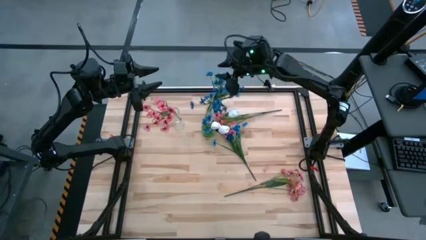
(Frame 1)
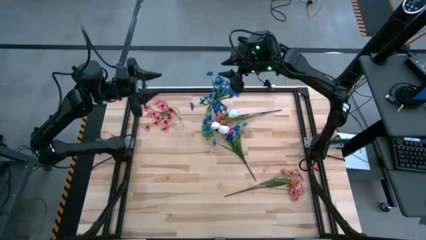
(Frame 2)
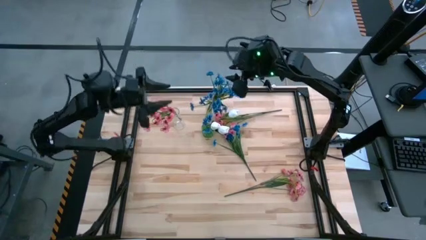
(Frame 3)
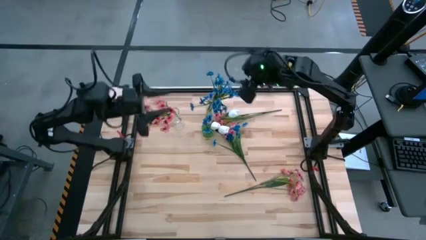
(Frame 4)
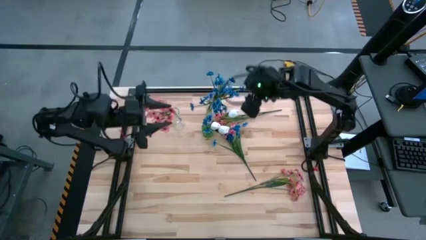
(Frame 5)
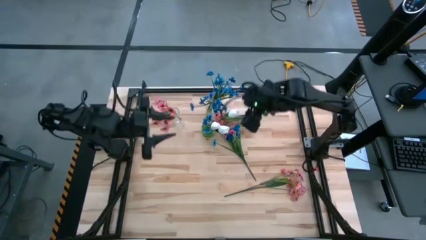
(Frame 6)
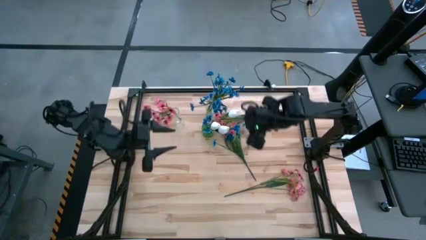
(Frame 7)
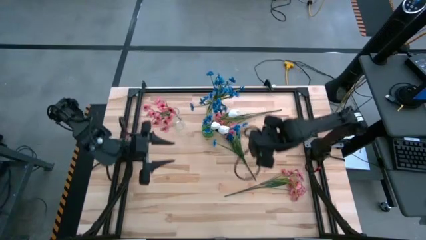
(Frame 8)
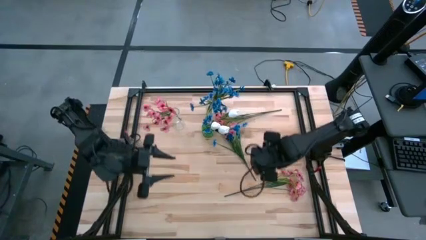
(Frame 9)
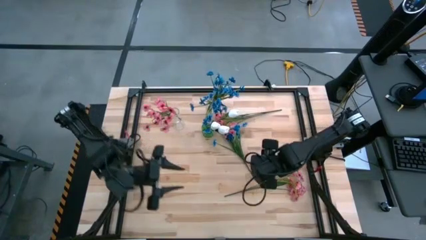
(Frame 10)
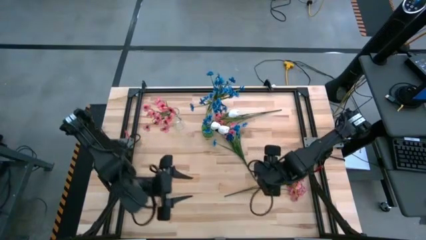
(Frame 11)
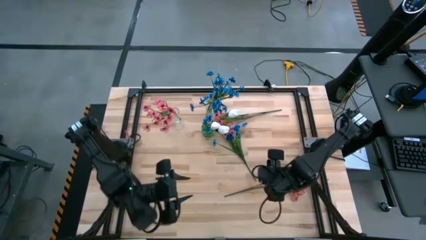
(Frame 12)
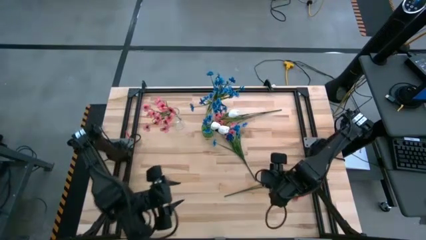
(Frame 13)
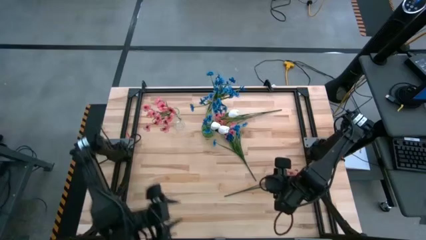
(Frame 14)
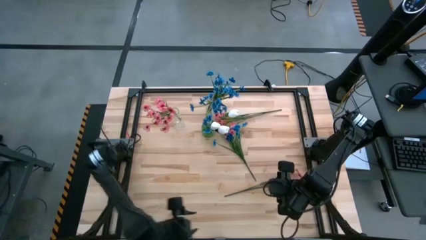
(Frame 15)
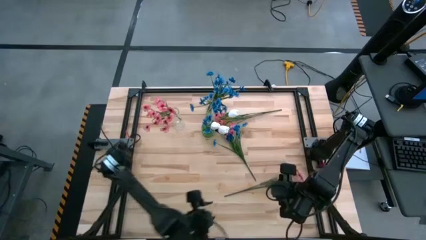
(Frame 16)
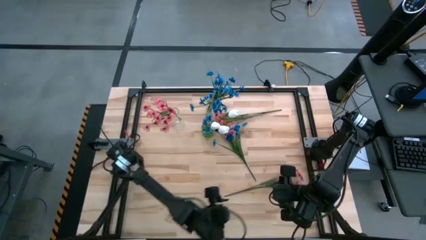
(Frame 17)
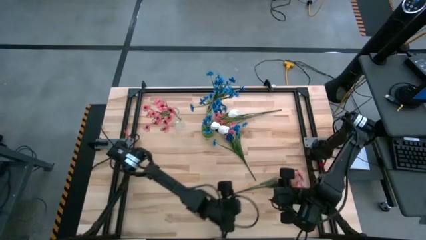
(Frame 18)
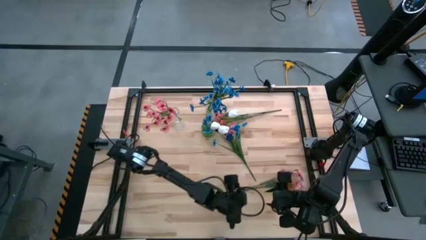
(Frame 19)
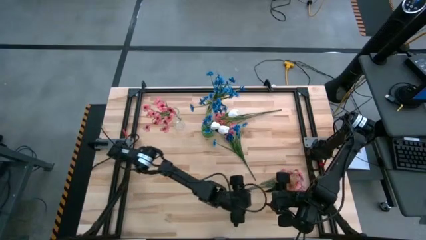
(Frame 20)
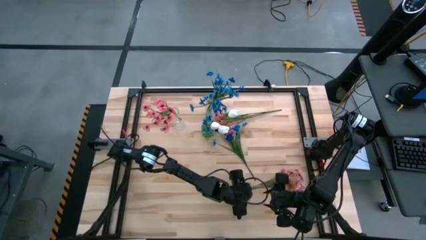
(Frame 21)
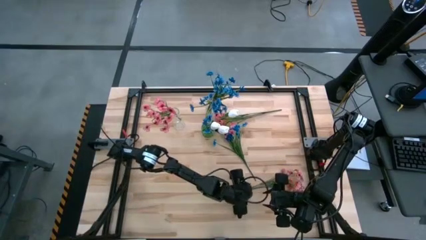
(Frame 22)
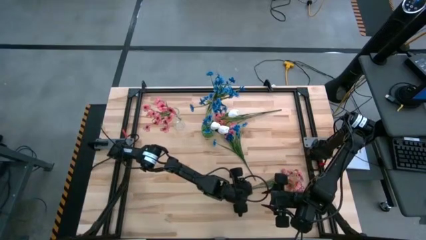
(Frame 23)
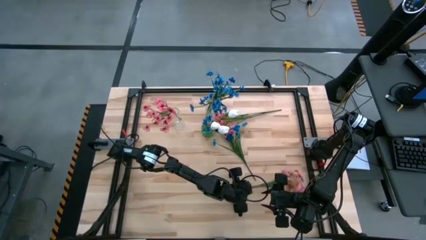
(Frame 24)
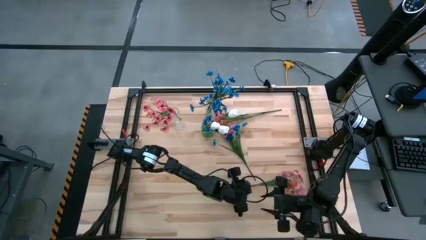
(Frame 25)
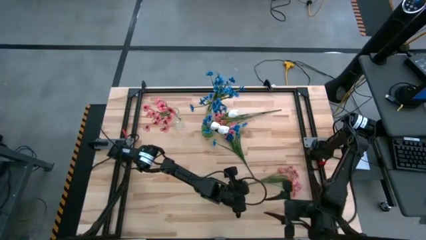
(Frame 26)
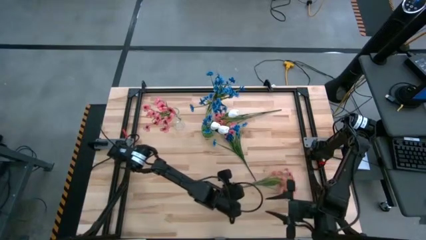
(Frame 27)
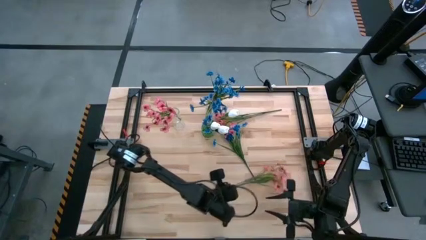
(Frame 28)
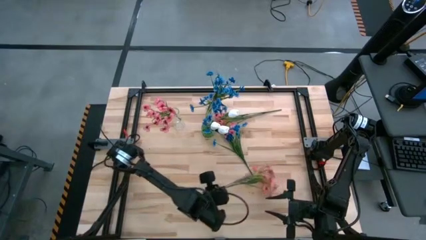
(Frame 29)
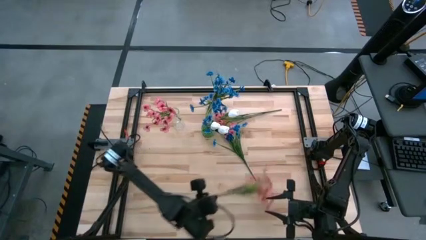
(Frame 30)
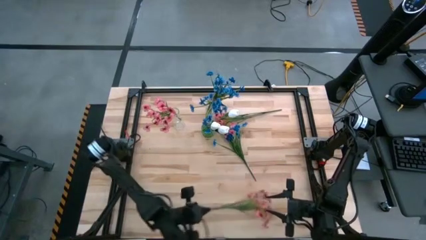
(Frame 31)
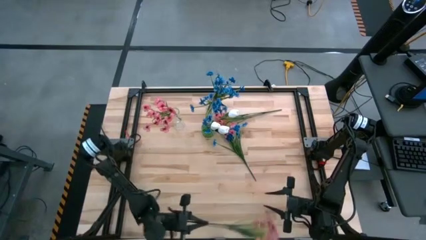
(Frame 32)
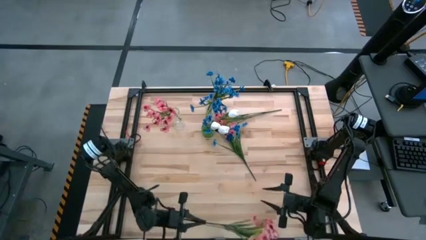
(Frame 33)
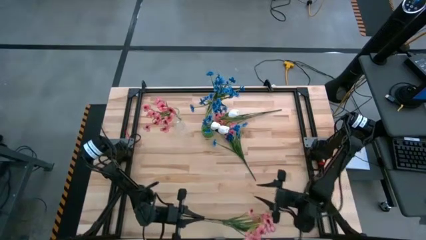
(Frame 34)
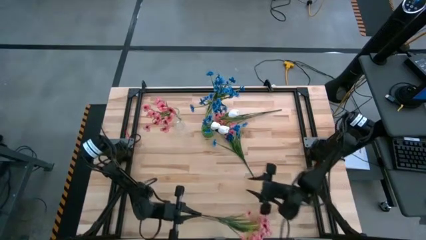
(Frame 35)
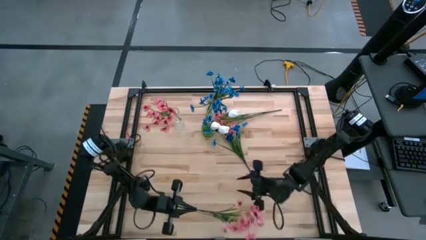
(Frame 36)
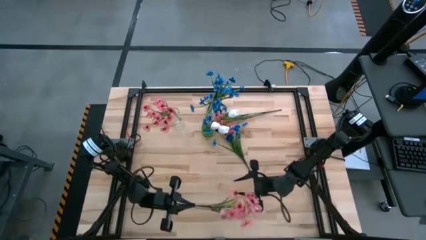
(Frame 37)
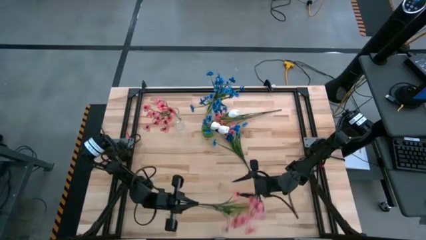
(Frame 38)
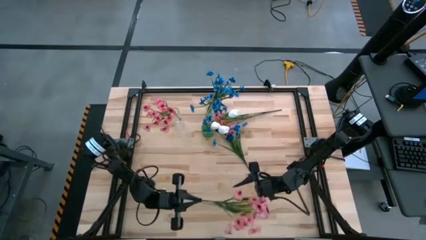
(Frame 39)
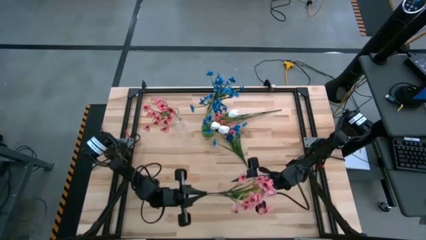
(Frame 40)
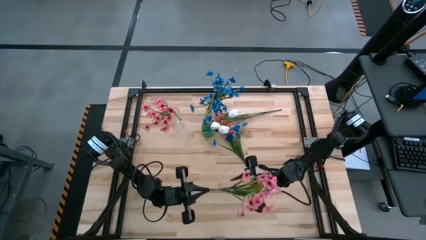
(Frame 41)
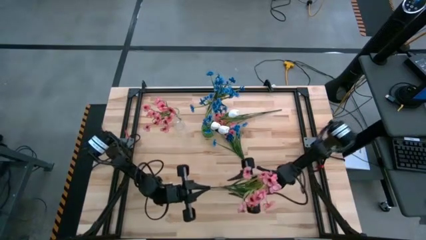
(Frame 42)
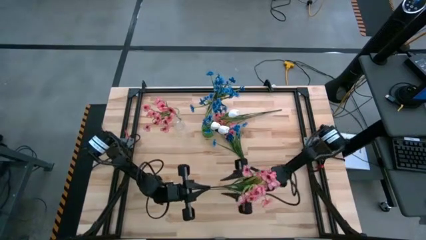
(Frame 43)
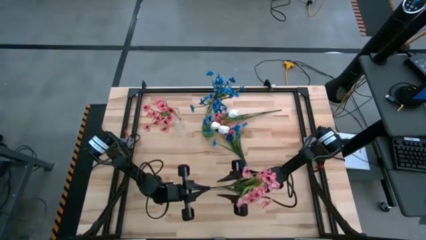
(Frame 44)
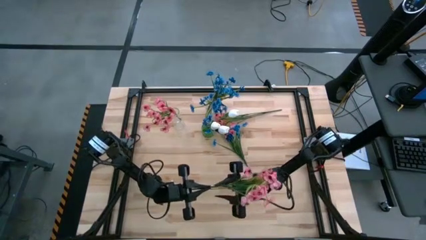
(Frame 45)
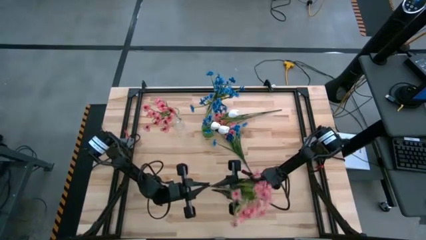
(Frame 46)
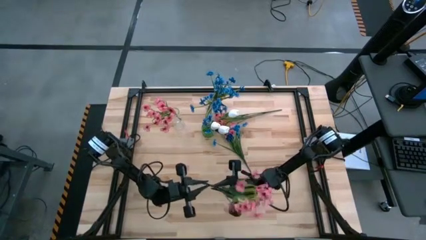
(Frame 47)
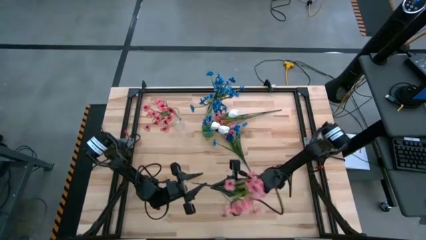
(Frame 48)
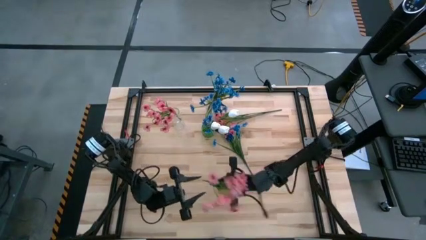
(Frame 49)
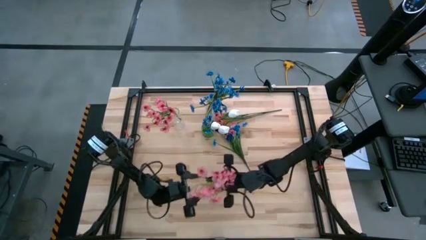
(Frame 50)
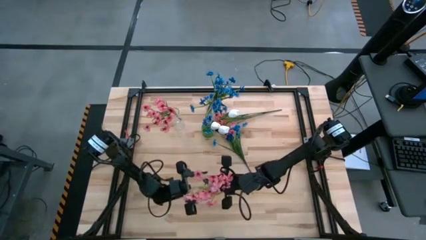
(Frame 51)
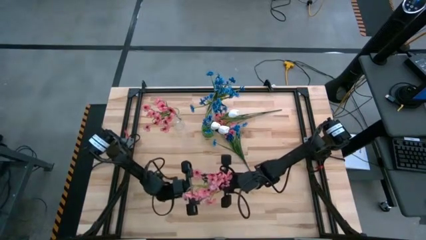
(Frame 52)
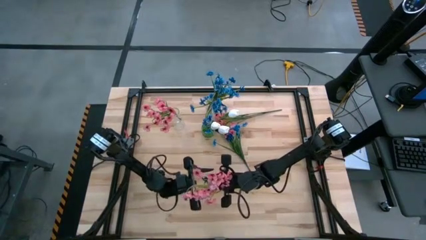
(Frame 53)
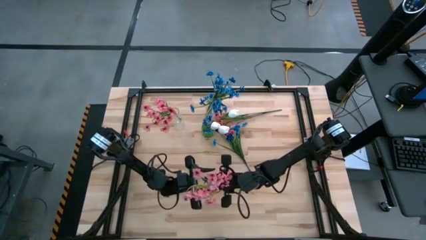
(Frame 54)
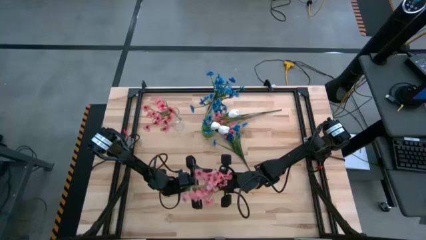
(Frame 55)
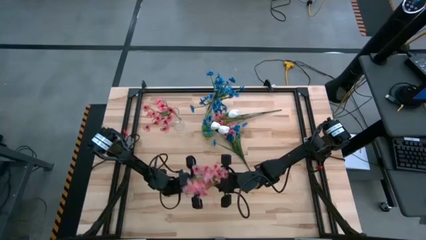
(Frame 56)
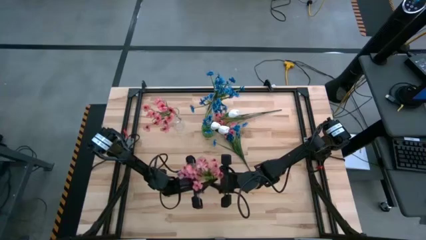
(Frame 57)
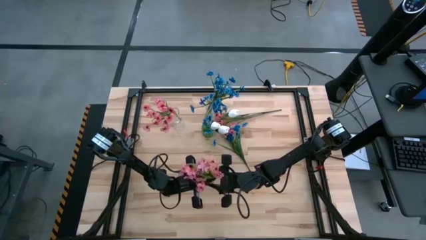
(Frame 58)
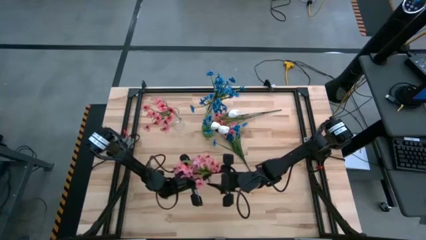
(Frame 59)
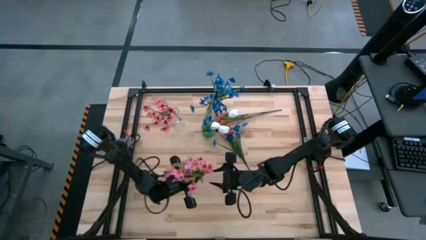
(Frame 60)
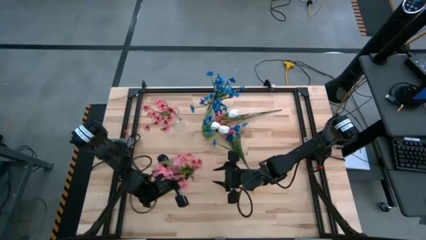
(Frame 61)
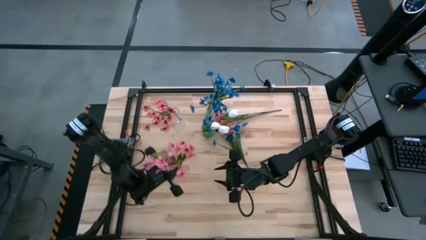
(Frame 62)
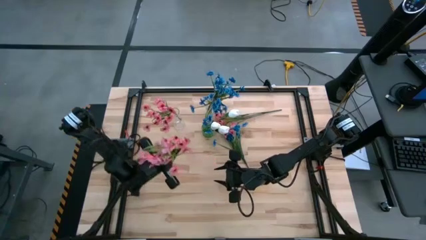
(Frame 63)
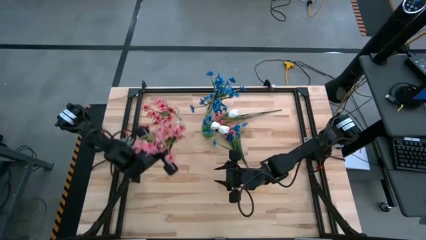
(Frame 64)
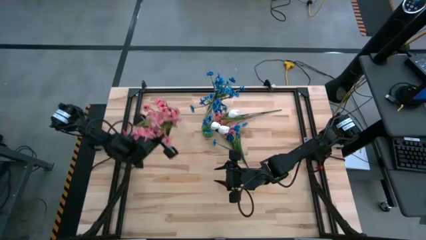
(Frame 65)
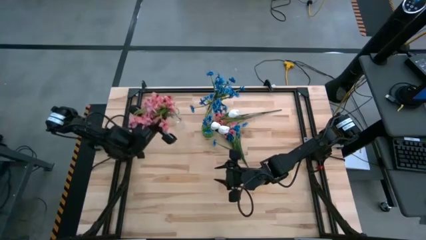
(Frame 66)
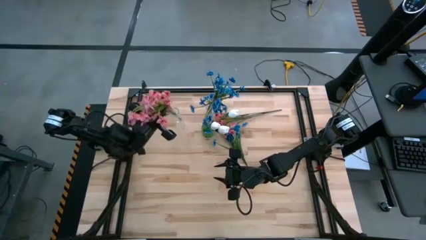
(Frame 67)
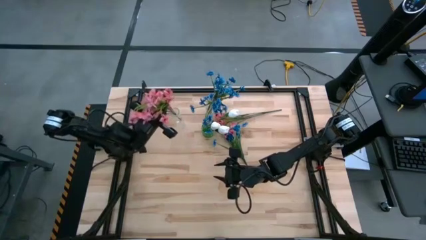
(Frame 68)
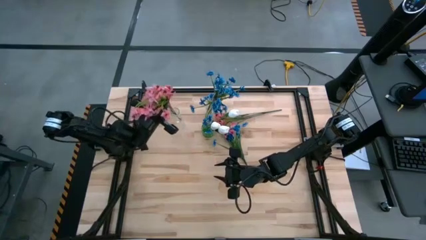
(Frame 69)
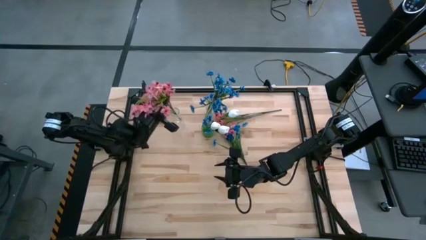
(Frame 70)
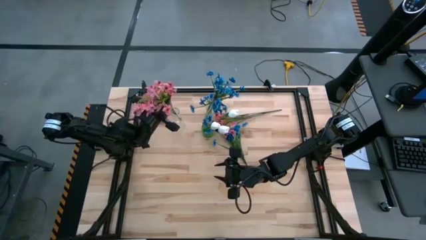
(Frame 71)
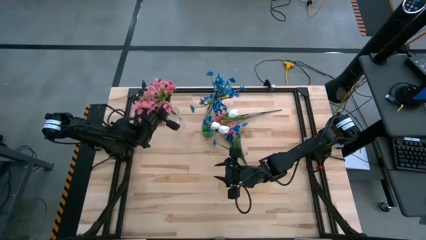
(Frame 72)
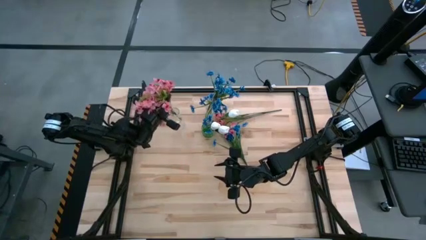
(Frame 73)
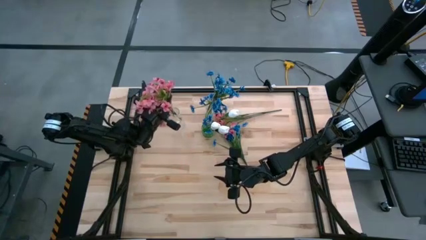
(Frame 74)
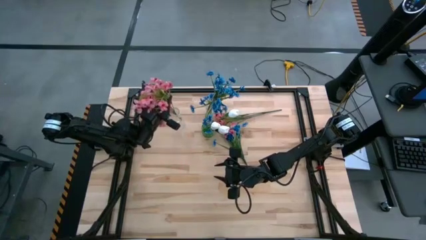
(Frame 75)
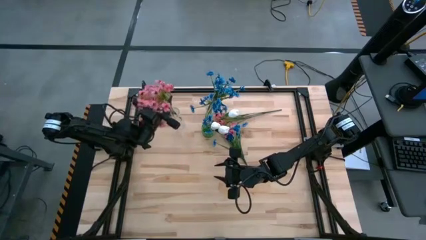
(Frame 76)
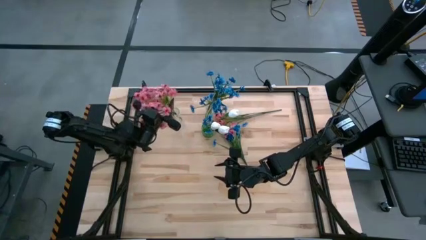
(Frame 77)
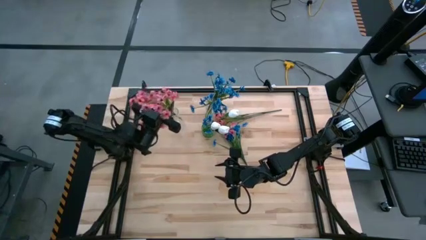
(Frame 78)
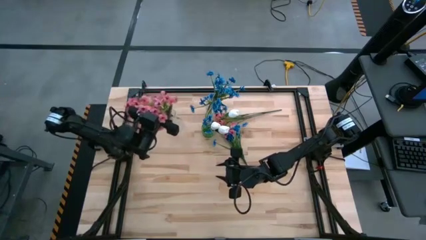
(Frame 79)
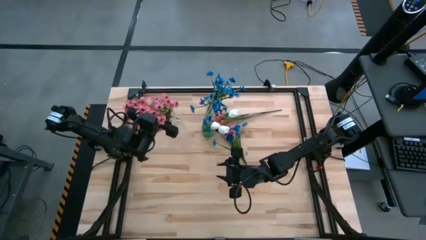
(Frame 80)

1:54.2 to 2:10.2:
Task: Sort flowers into vase by color
Put the bottom pink flowers into the left transparent vase

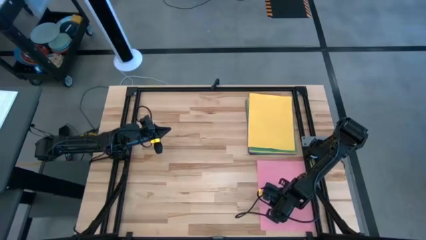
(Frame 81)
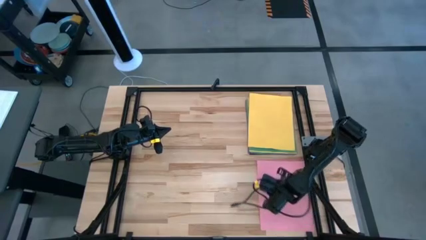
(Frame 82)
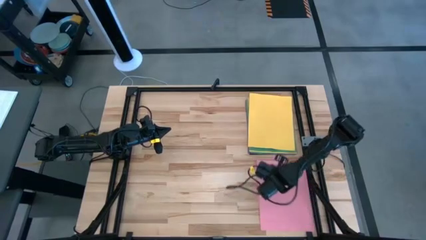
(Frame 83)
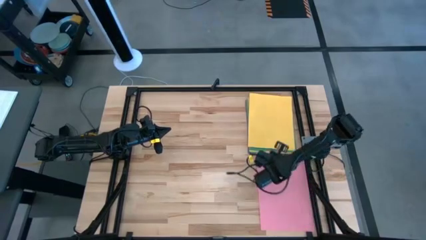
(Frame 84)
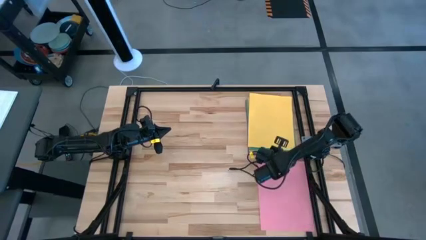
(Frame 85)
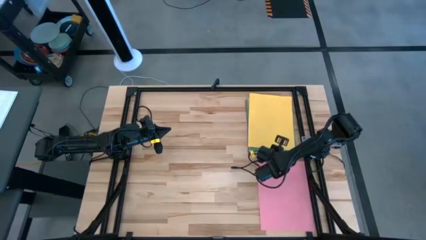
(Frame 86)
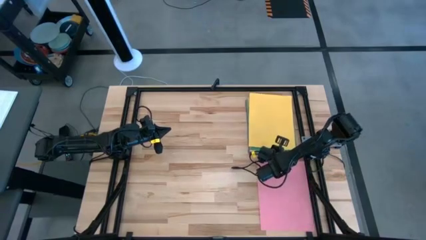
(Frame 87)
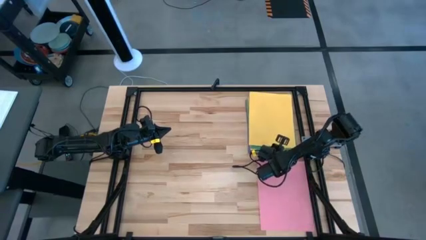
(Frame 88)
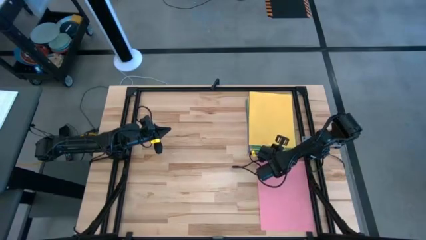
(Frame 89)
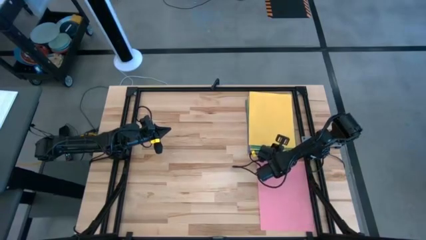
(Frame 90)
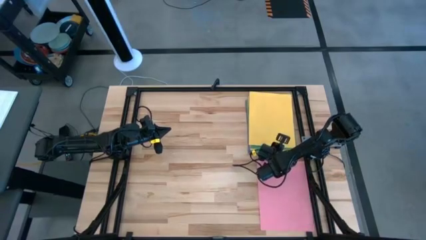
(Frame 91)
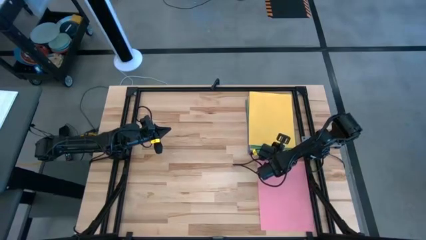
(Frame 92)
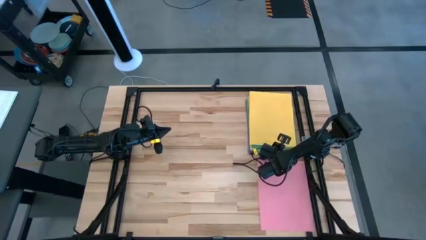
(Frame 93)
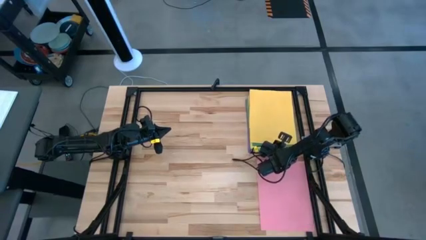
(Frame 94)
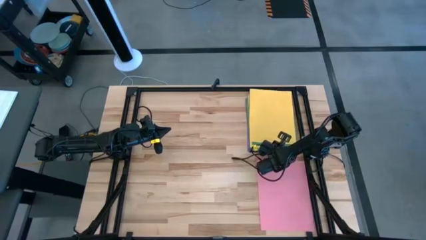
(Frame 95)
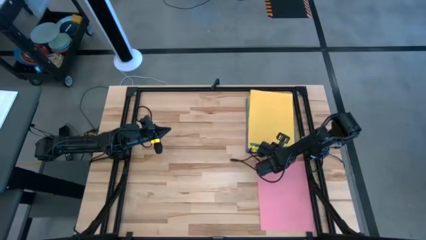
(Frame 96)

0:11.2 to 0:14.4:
Task: Organize paper
Move the yellow paper to the top center of the table
